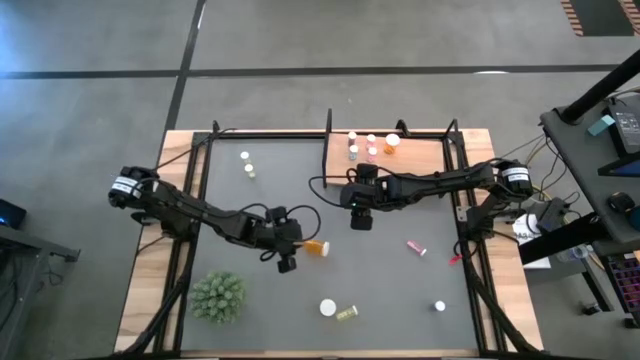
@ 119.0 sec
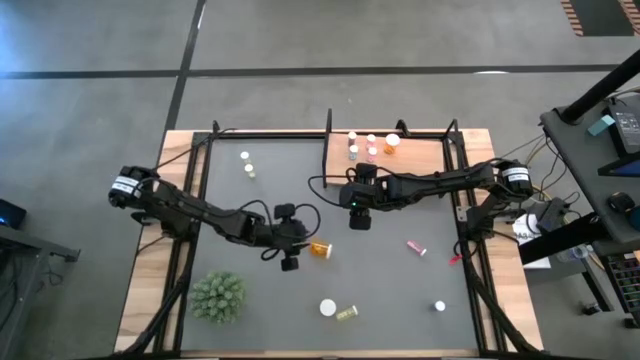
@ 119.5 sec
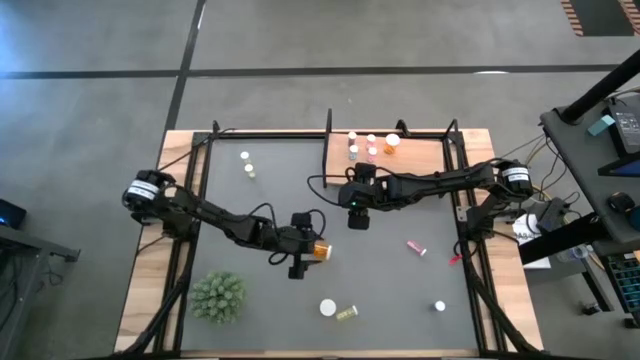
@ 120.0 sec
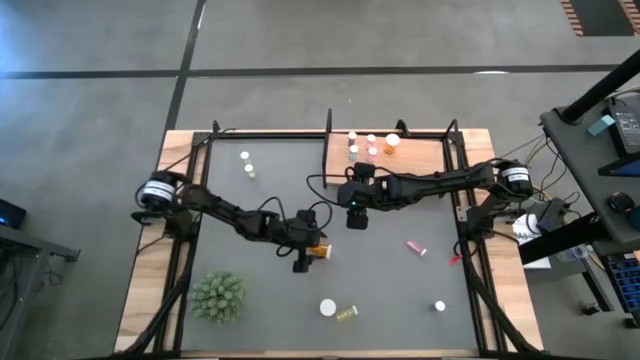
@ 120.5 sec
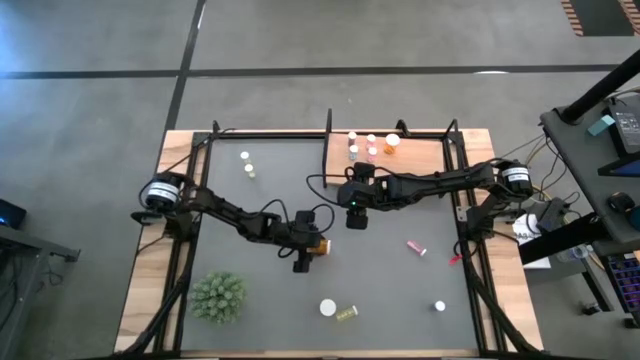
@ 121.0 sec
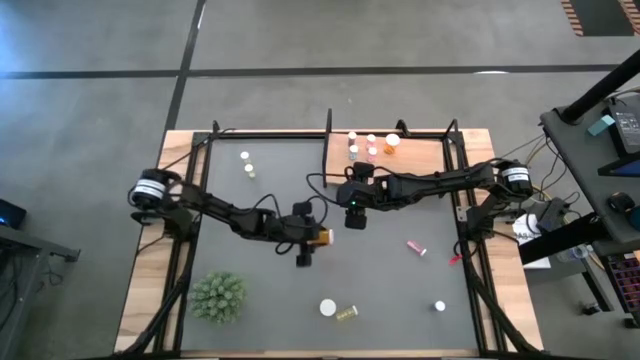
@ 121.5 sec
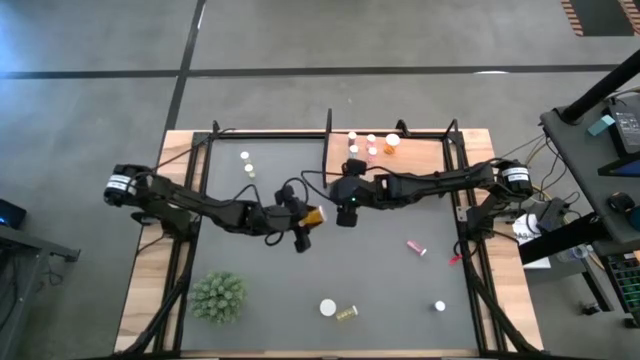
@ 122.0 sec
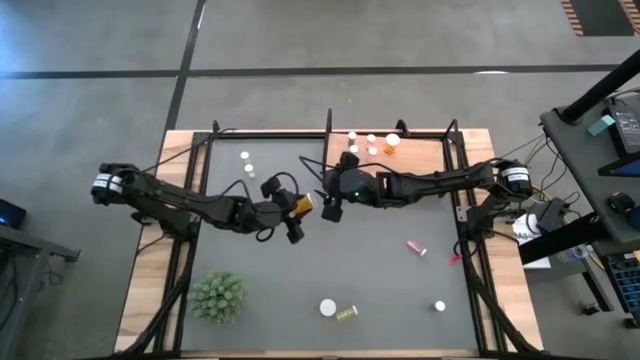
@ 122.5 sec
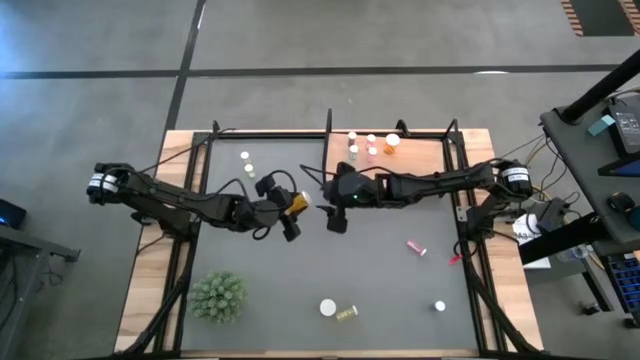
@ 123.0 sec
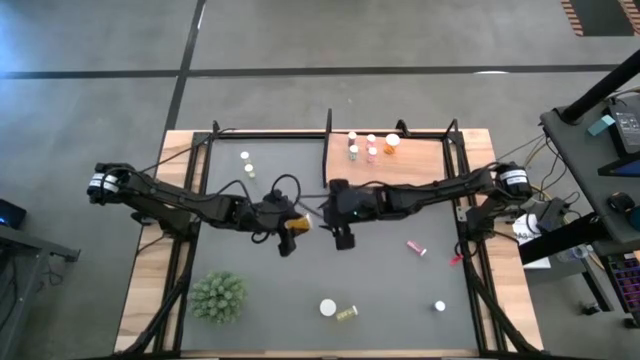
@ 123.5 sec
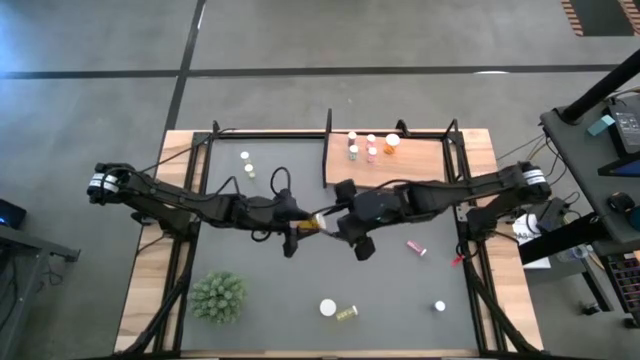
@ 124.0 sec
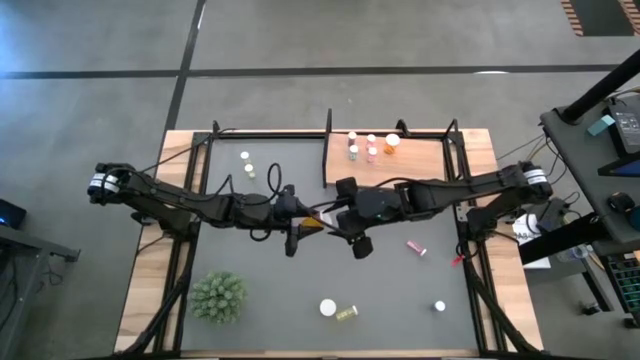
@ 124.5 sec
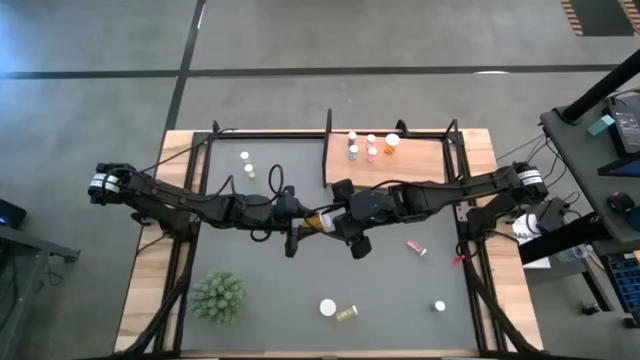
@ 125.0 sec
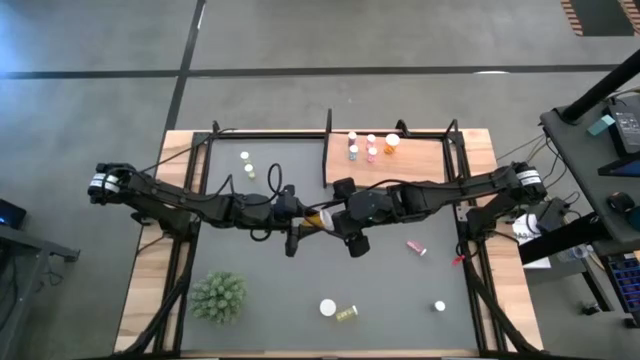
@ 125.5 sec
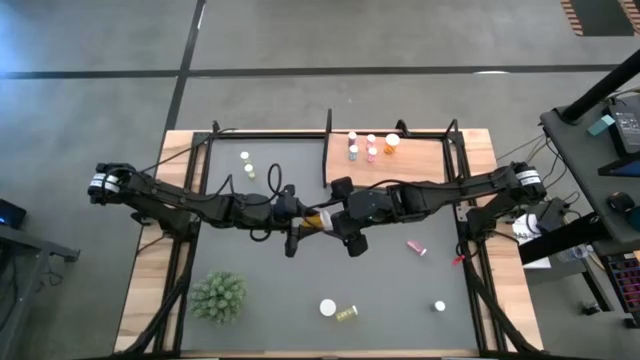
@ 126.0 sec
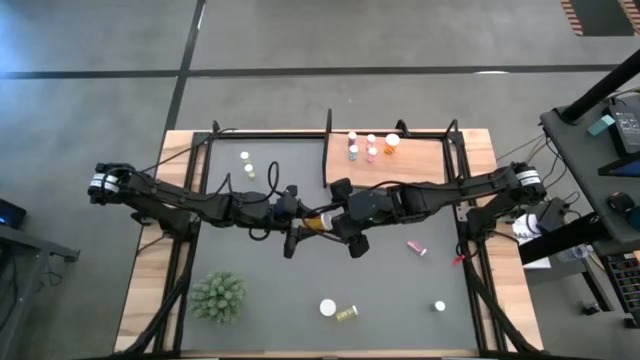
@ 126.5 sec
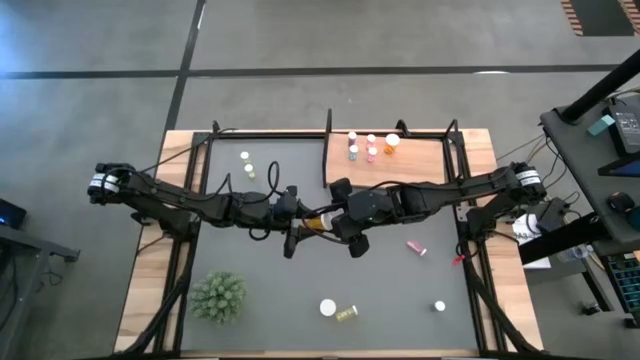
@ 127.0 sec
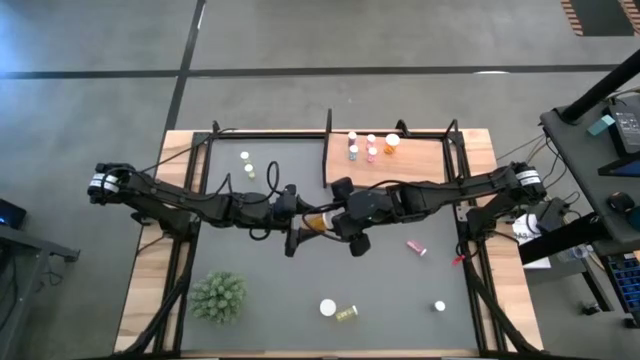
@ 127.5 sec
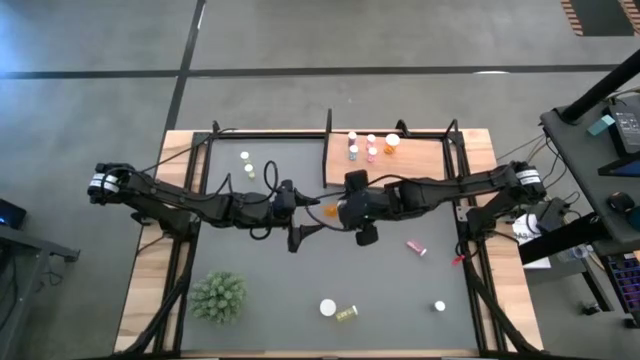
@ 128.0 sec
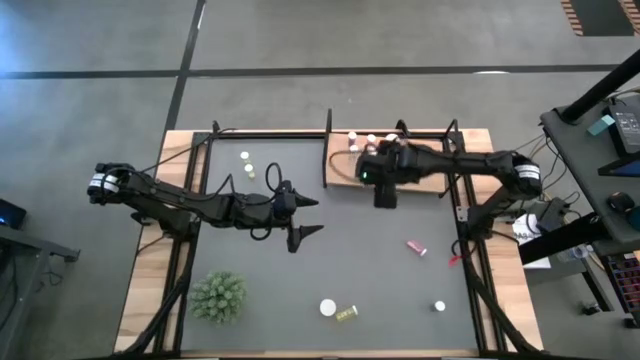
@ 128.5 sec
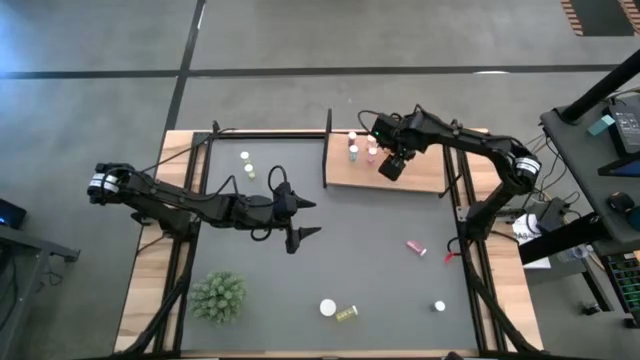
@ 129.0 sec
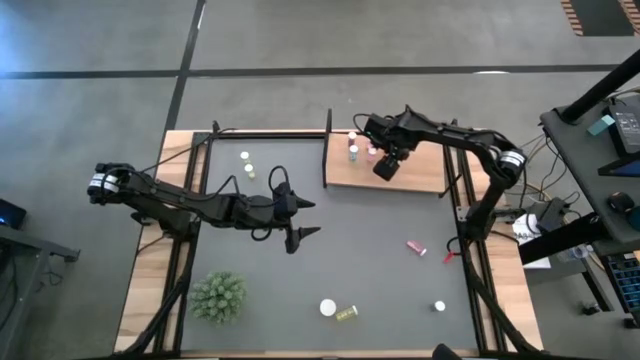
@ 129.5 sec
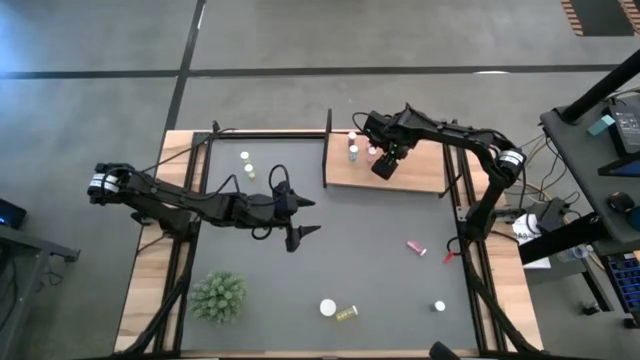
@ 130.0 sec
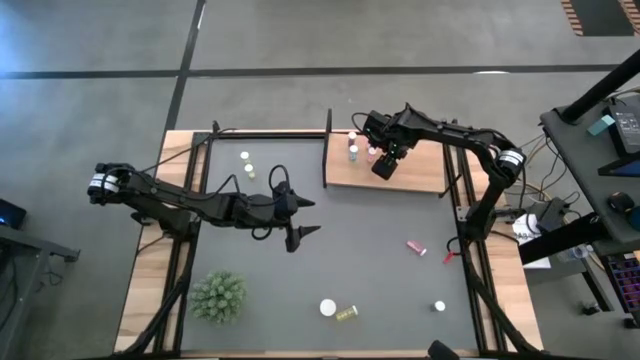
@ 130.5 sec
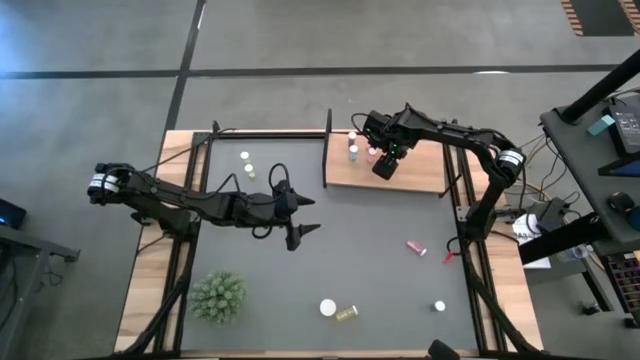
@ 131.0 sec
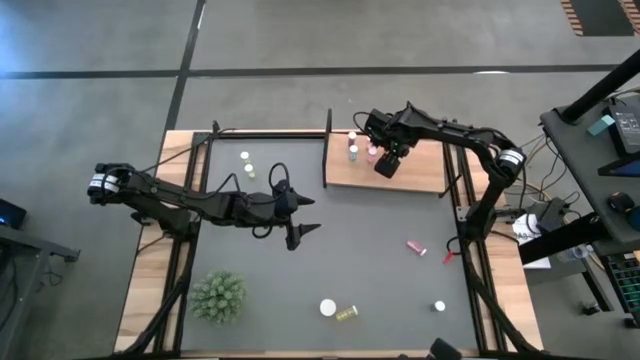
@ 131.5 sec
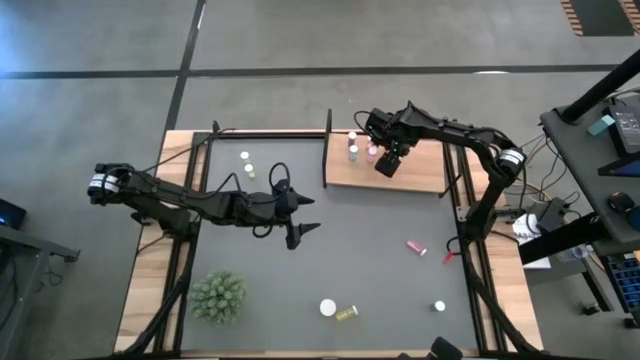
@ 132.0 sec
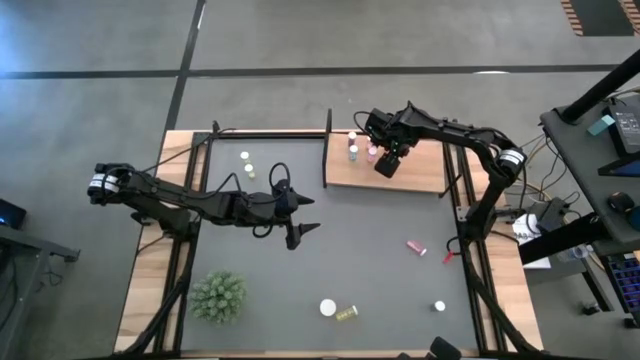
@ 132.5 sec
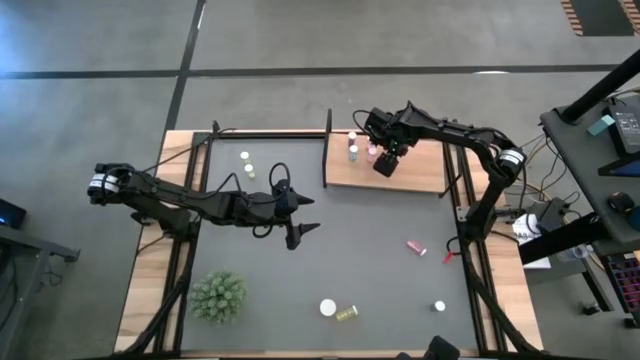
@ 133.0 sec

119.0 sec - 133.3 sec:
Task: Pick and place medicine bottles onto shelf by color
Put the top orange pill bottle on the shelf aligned with the other orange pill bottle

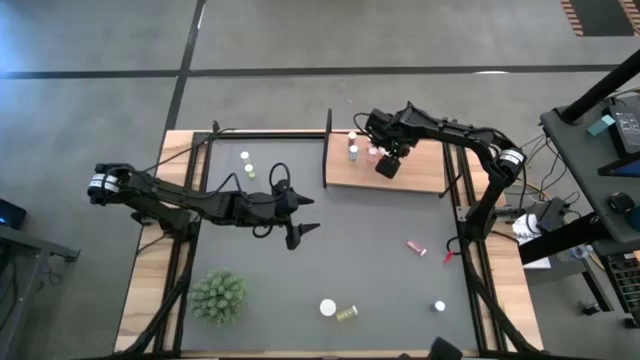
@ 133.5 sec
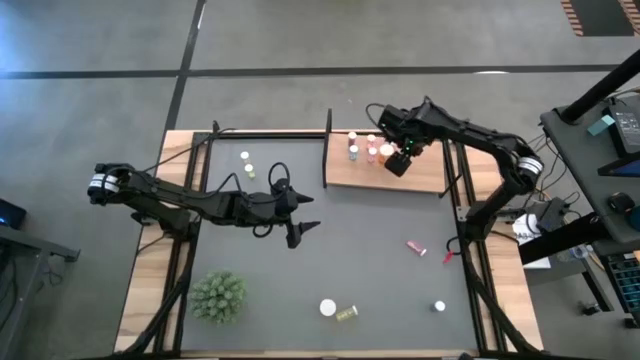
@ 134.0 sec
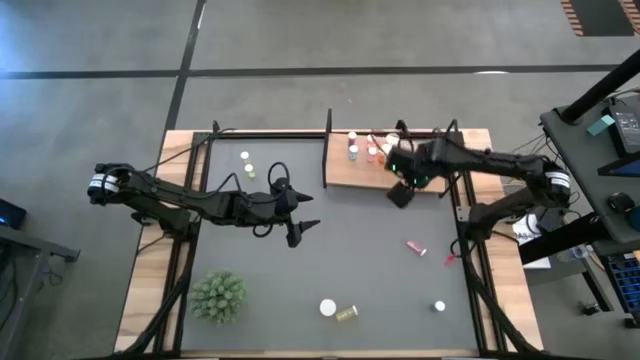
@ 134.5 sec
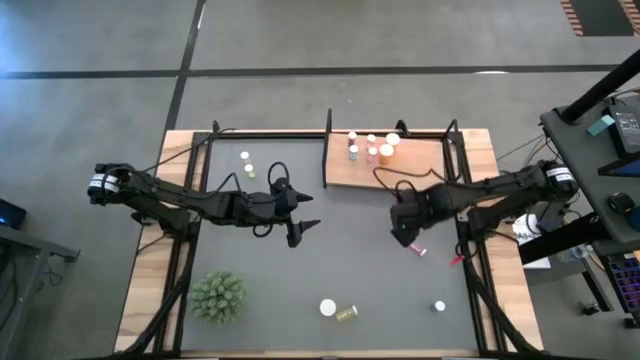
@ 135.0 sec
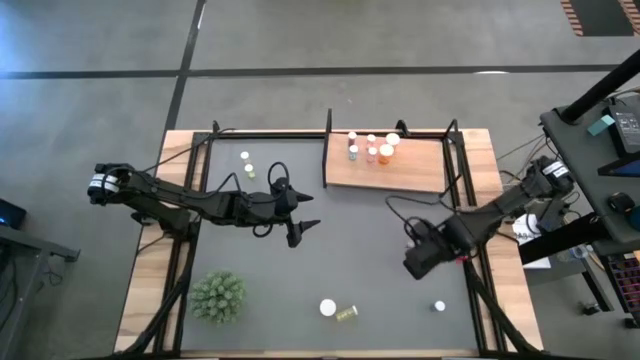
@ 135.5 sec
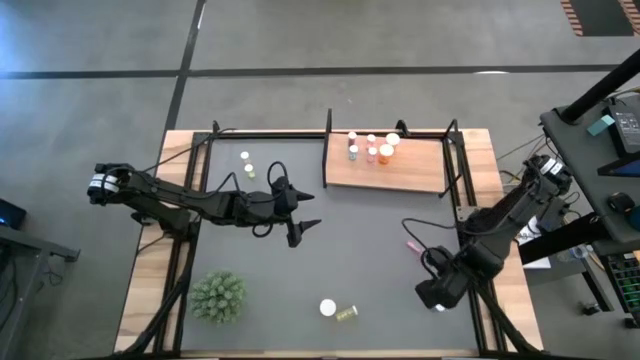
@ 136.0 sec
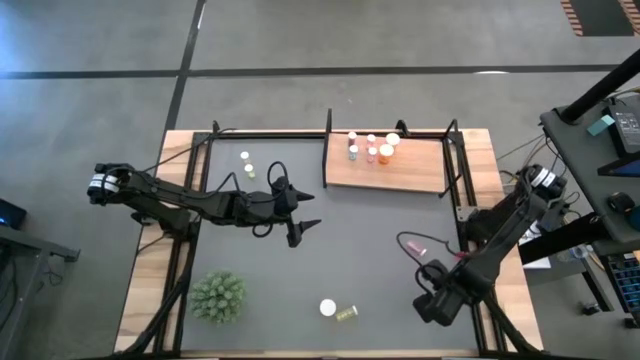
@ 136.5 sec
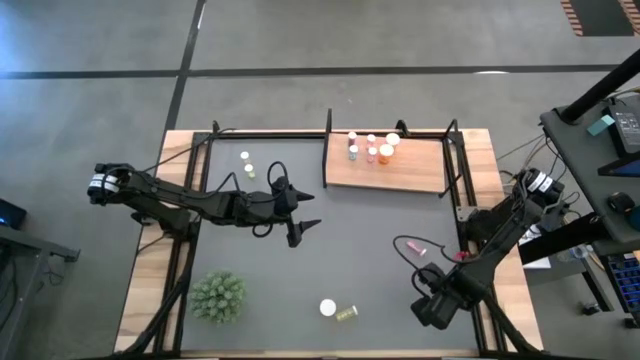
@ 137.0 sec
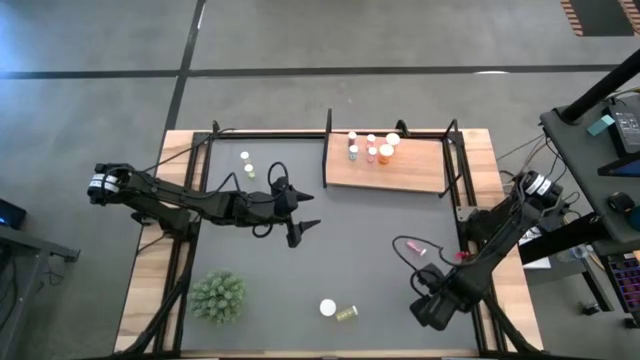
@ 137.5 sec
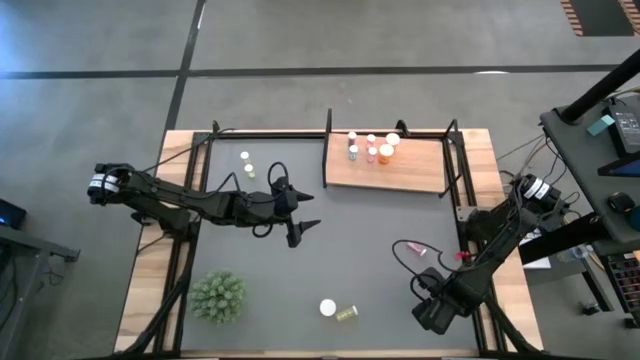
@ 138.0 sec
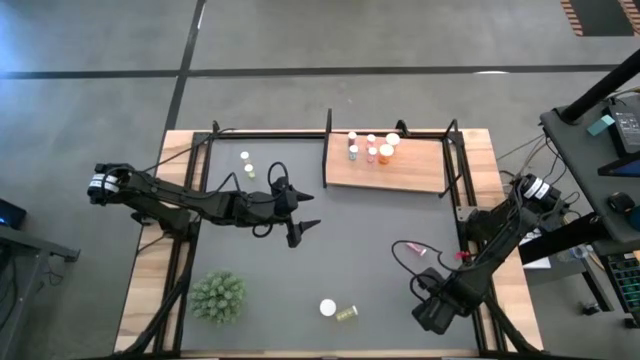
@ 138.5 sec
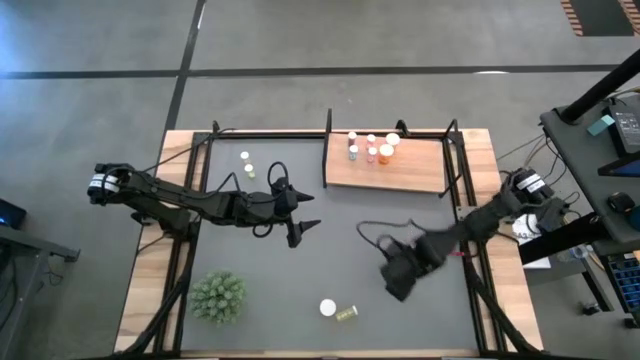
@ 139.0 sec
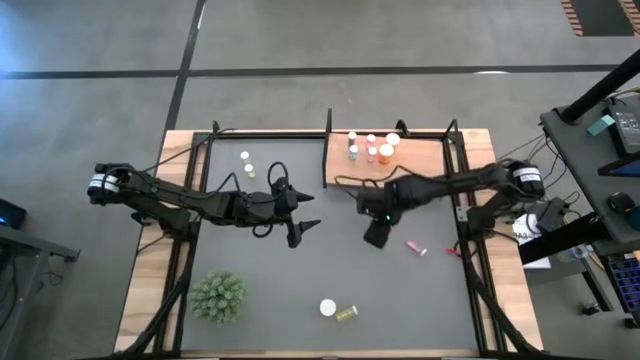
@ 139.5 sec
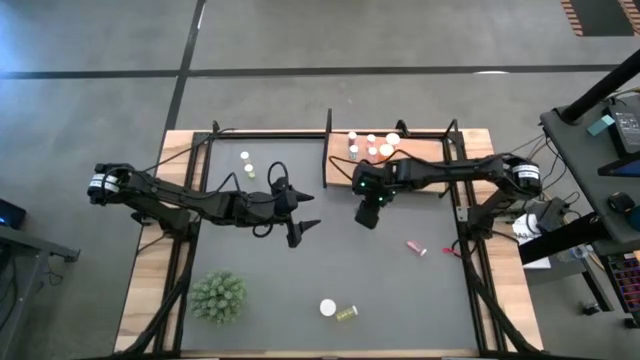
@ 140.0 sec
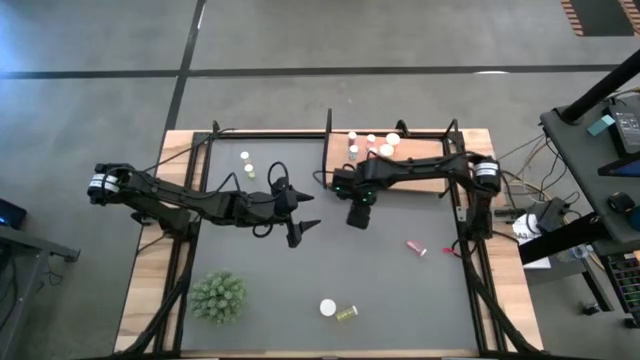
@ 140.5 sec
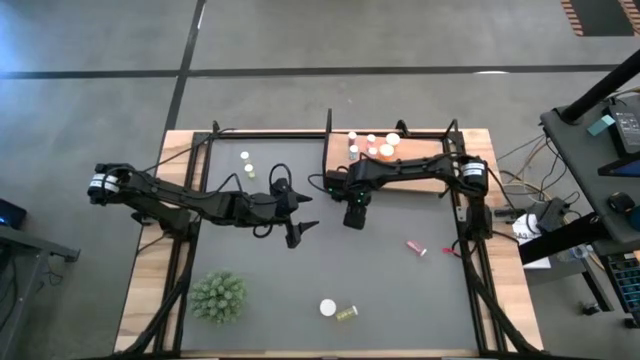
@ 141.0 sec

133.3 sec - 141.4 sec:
Move the blue pill bottle to the center of the table
